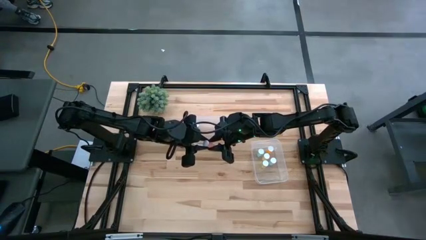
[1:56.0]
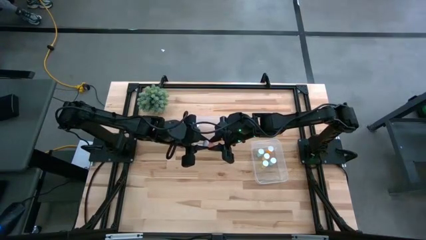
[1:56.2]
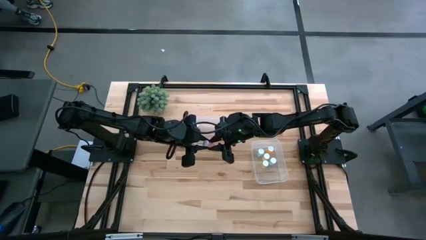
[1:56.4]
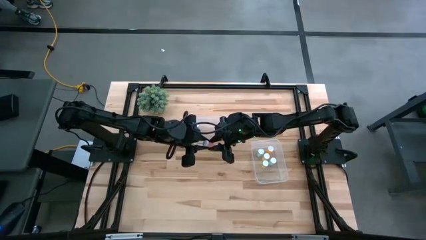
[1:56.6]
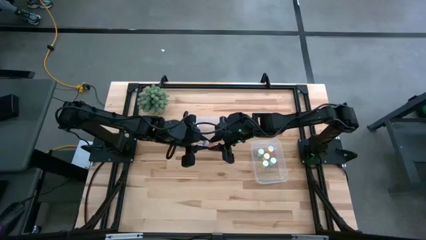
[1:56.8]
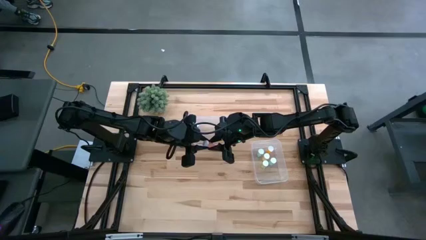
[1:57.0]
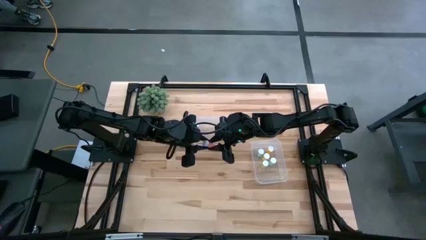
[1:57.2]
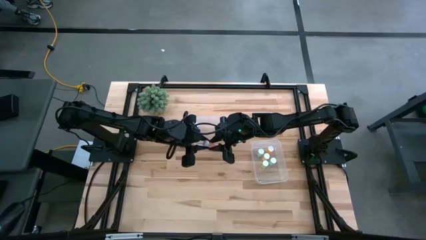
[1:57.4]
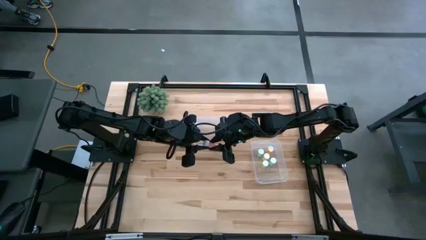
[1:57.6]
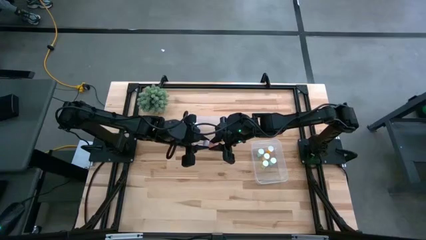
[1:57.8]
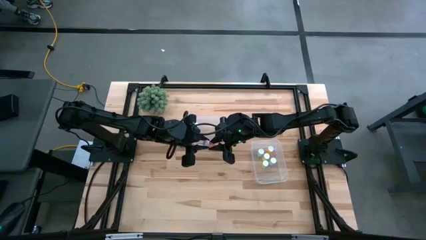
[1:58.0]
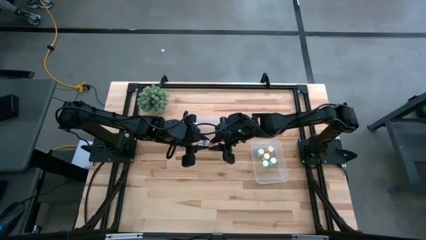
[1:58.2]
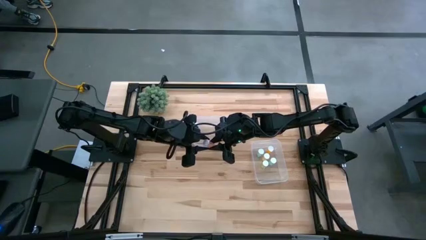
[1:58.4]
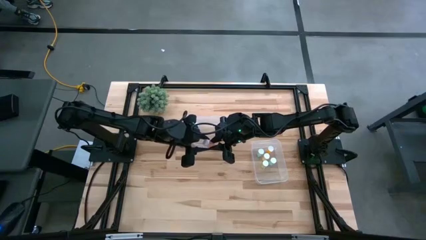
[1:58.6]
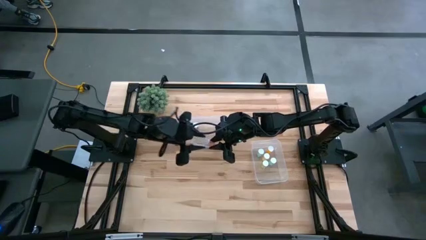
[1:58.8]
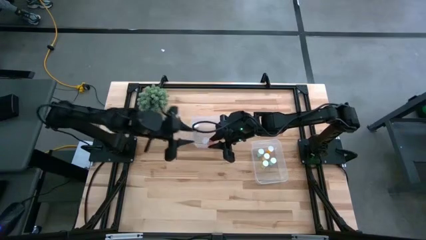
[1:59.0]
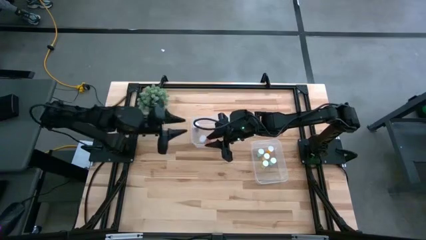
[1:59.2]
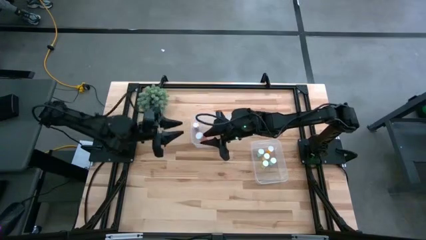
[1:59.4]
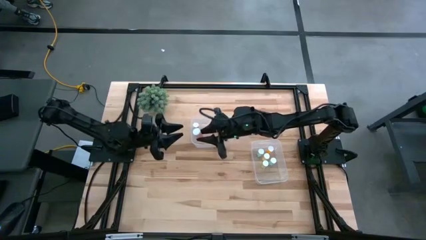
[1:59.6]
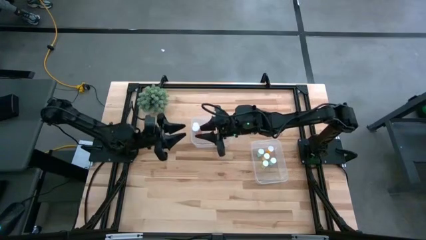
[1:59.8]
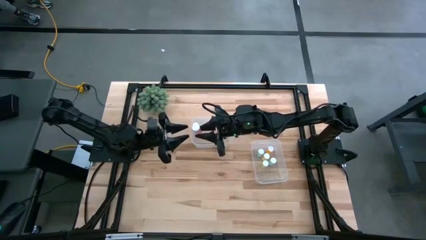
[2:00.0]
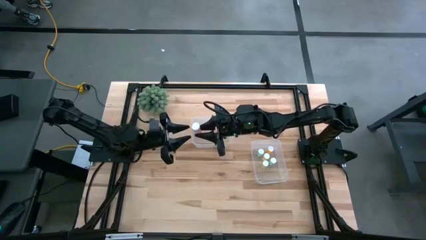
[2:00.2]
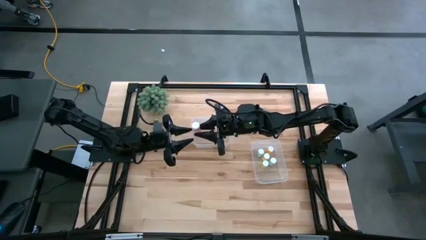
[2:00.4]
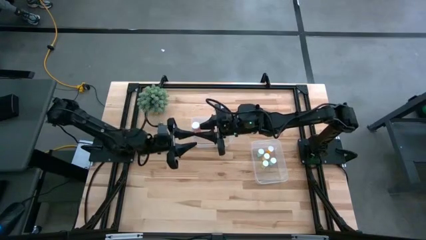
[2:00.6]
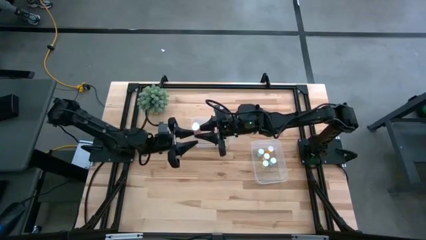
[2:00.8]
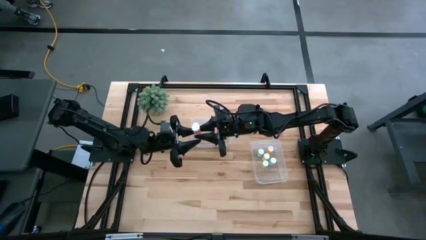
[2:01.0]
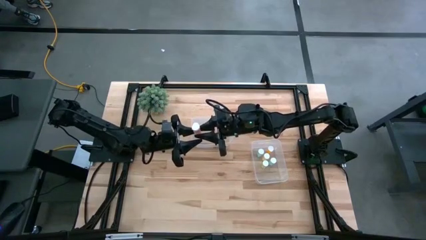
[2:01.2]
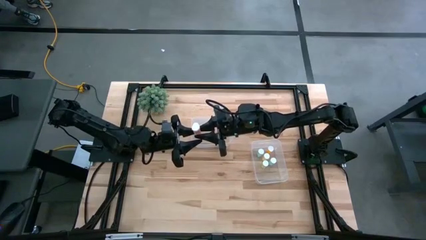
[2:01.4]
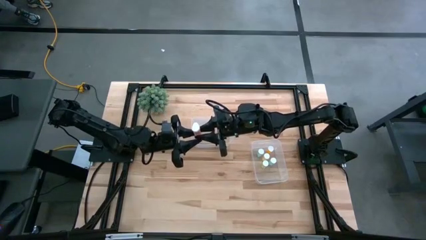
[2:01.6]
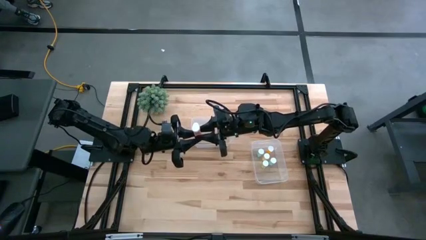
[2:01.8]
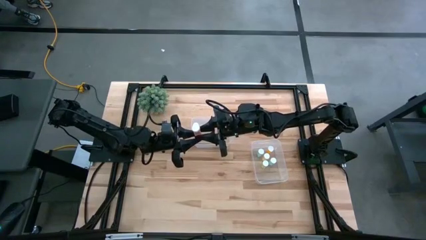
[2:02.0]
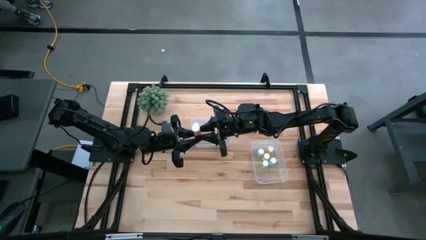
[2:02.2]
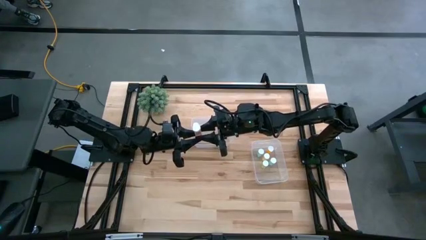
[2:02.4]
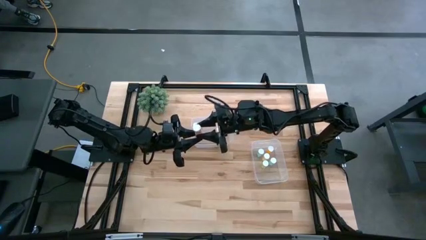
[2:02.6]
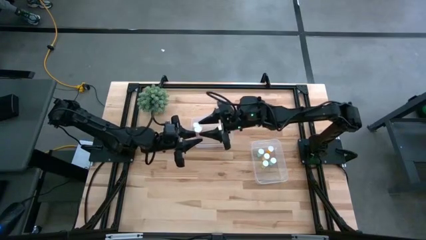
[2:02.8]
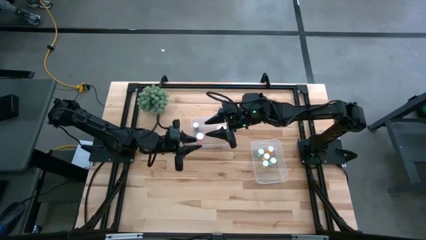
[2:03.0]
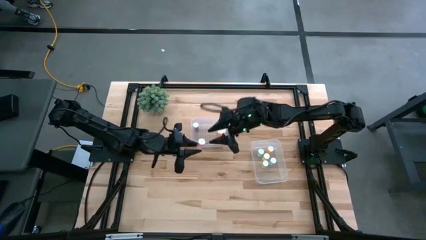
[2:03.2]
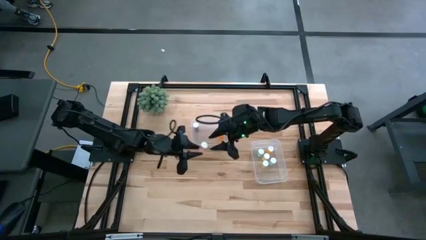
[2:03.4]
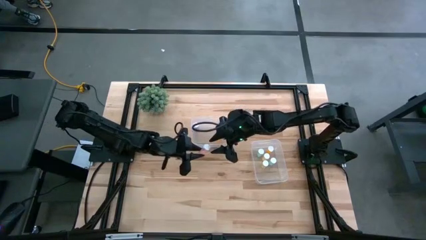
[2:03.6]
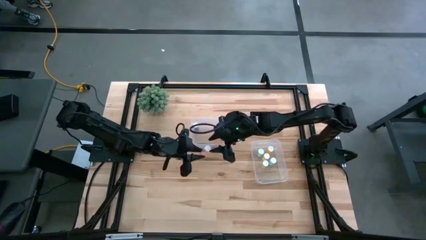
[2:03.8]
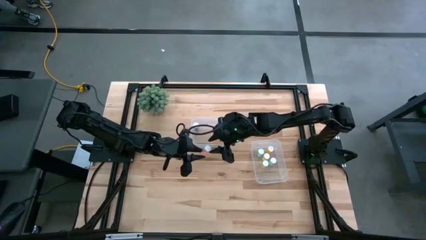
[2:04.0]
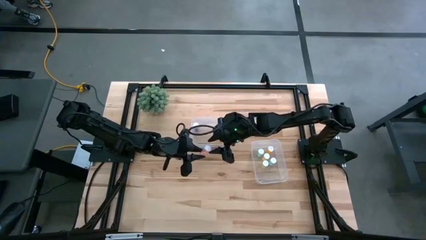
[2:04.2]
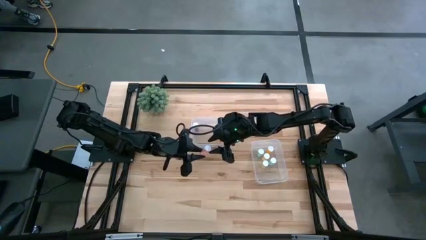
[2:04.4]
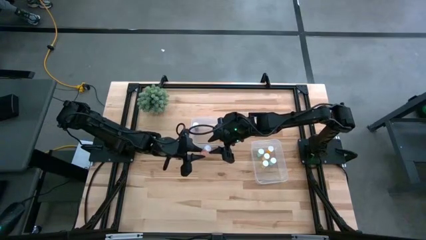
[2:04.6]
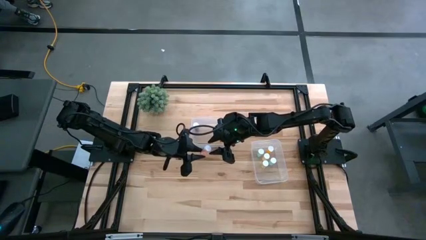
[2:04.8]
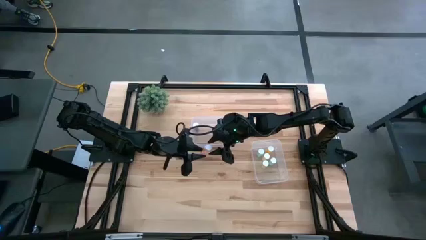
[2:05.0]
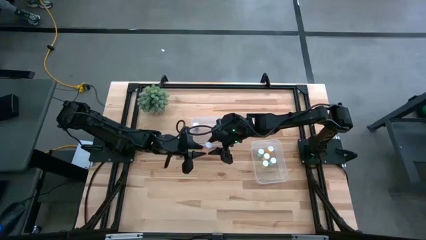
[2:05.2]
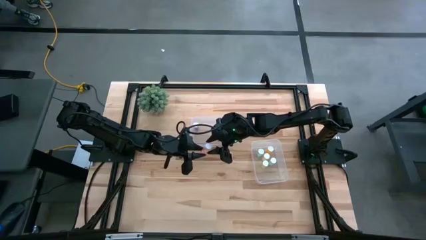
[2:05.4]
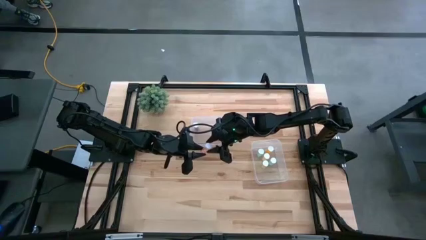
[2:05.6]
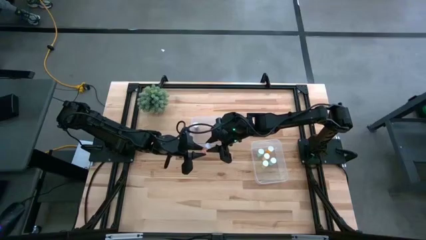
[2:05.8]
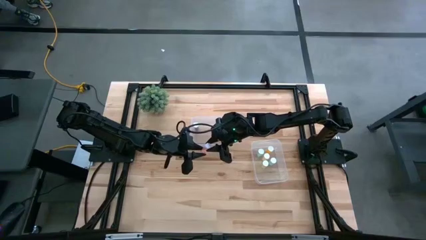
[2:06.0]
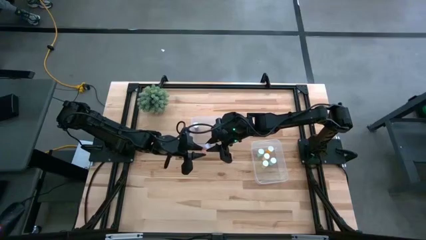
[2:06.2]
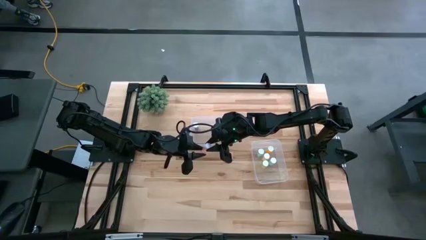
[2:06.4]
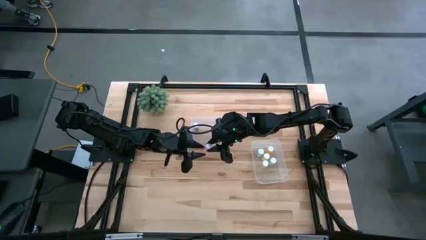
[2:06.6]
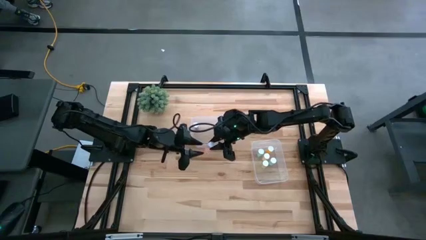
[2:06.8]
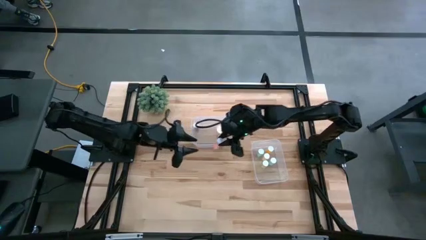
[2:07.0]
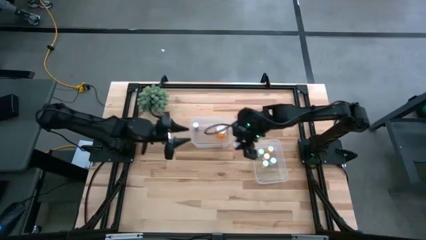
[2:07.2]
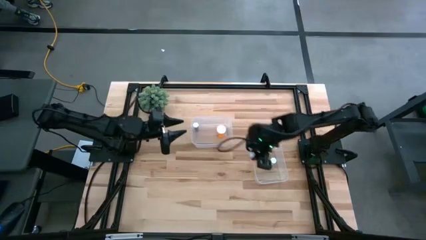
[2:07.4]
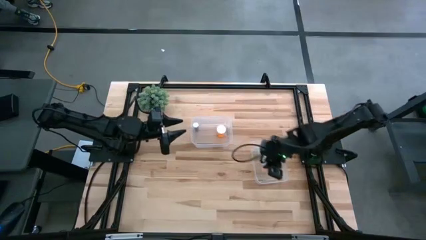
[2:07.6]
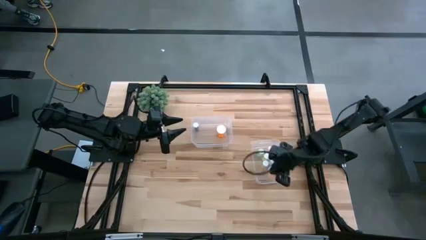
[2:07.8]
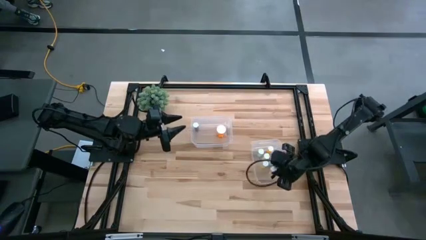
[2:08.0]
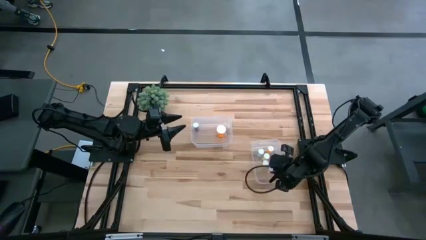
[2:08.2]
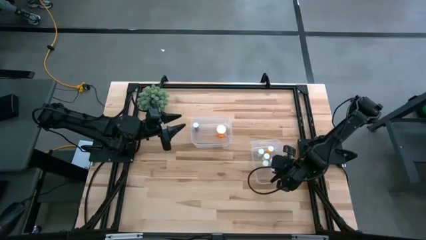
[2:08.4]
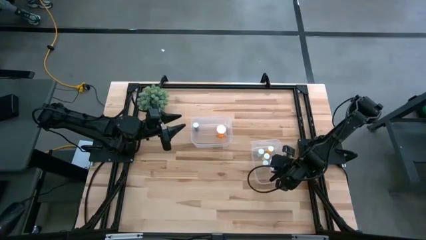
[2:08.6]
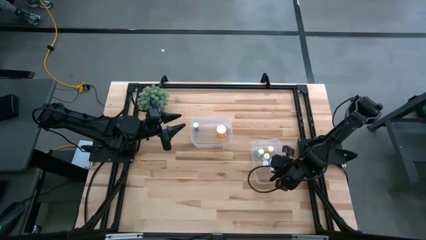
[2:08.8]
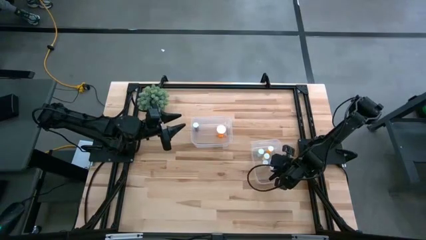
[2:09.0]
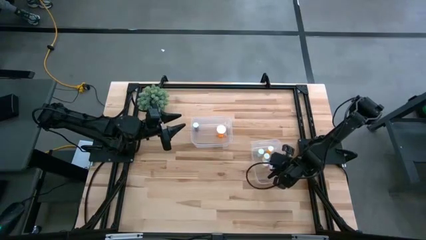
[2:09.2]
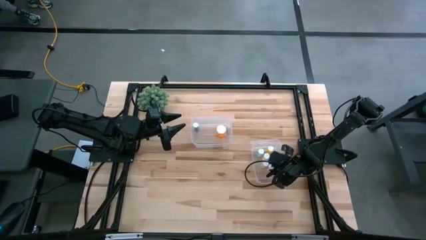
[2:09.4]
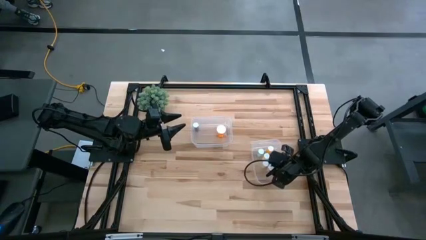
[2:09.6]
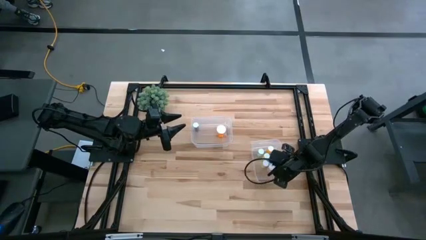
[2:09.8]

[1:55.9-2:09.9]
Task: Pick and place medicine bottles into bin by pill shape (circle, oval)
Put the pink tablet bottle into the bottom transparent bin
